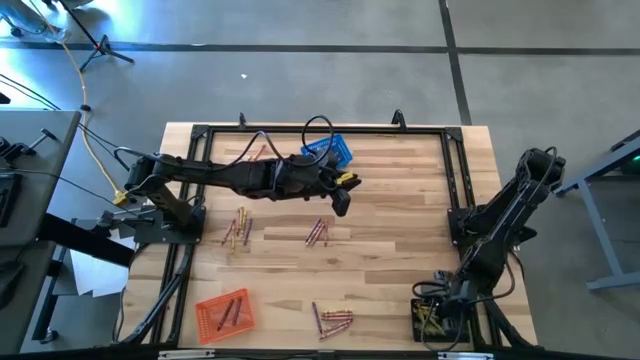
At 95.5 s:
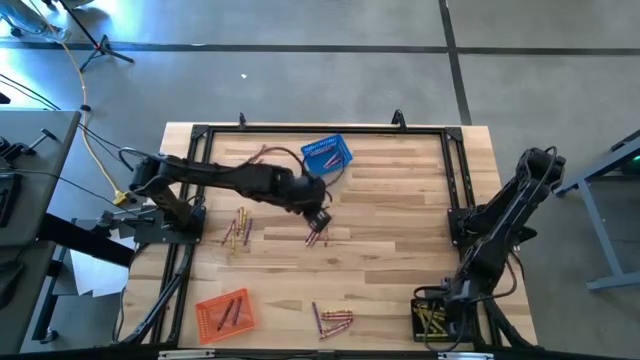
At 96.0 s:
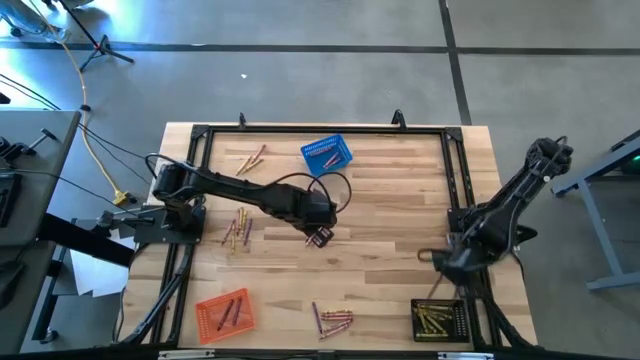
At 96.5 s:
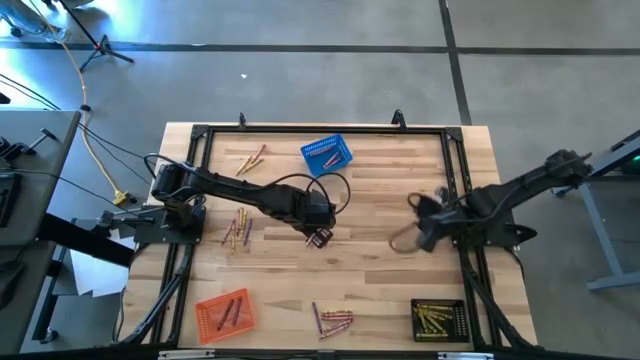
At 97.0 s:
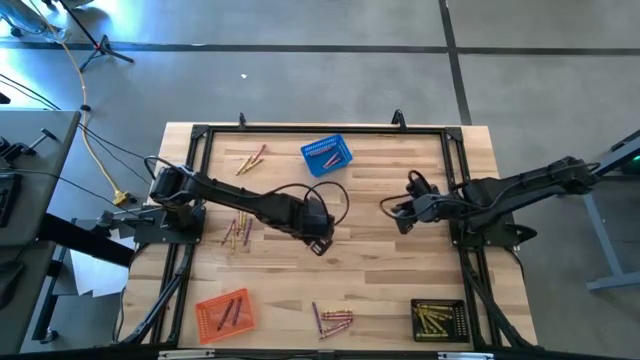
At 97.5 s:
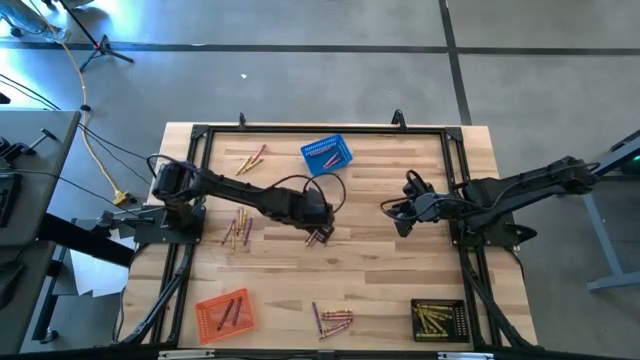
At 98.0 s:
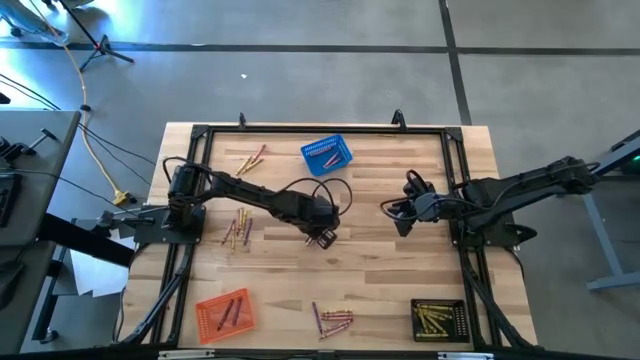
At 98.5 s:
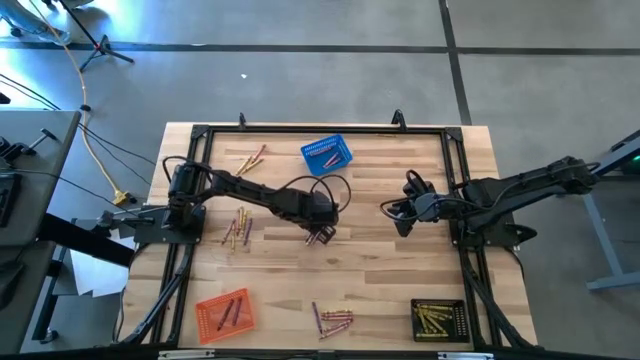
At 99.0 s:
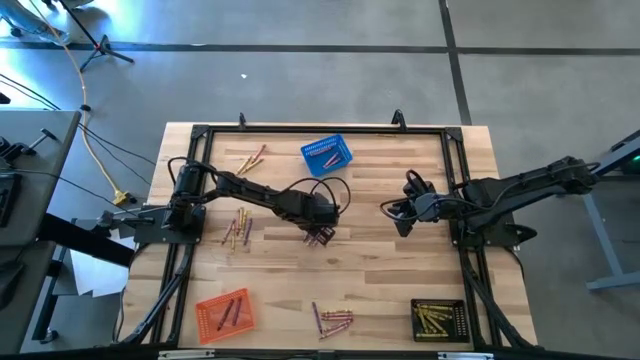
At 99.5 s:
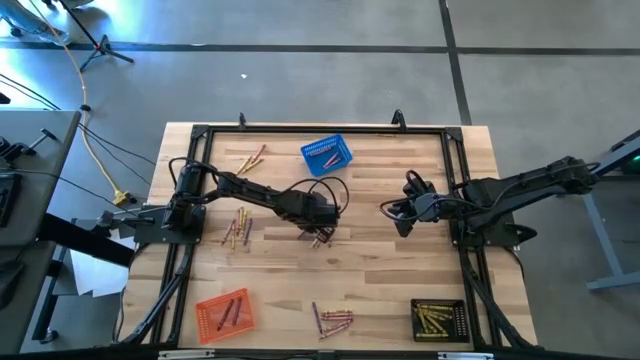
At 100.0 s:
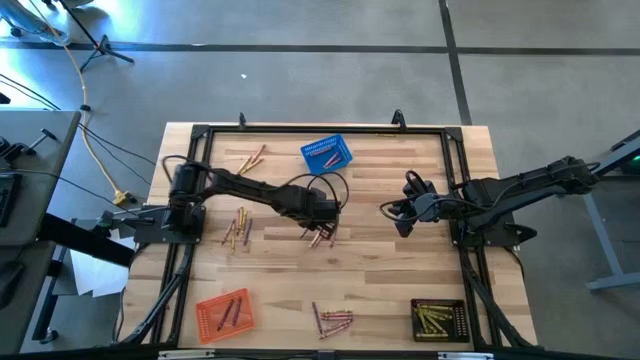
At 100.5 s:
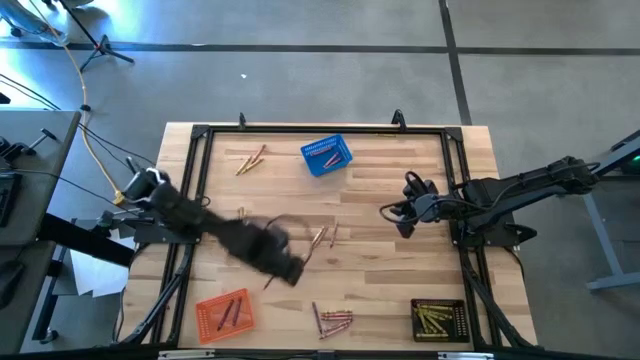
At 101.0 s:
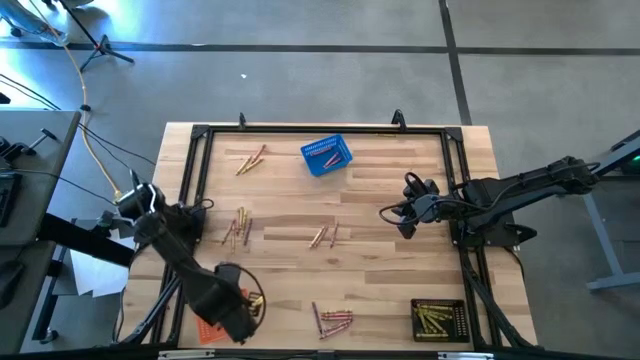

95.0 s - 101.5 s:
Task: Sort crayons
Put the purple crayon into the orange bin

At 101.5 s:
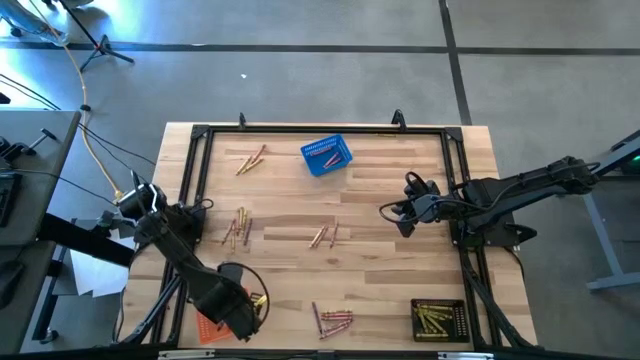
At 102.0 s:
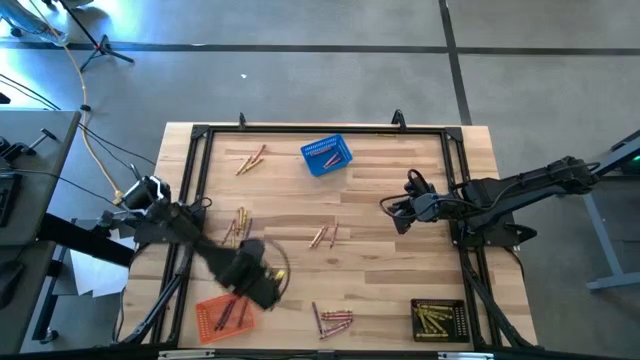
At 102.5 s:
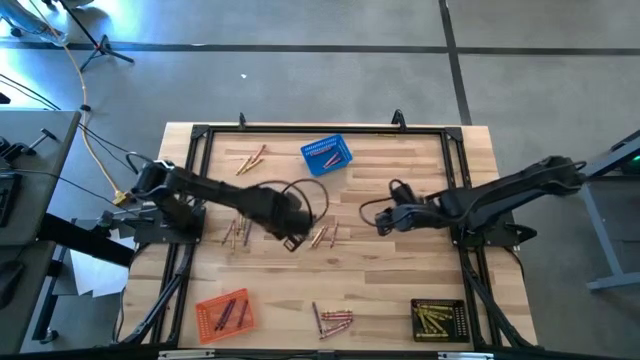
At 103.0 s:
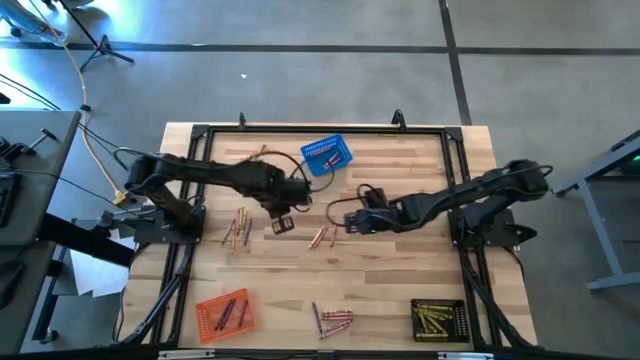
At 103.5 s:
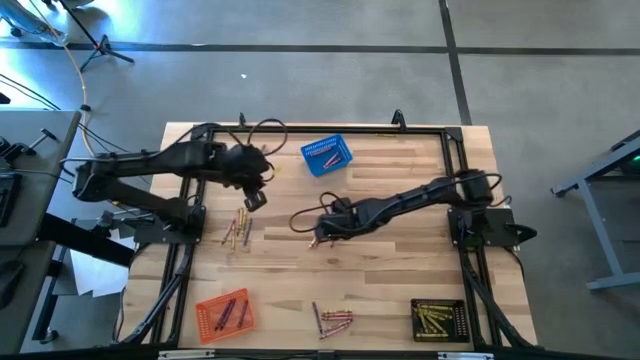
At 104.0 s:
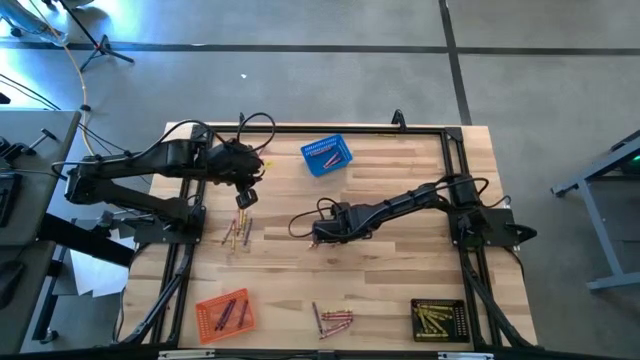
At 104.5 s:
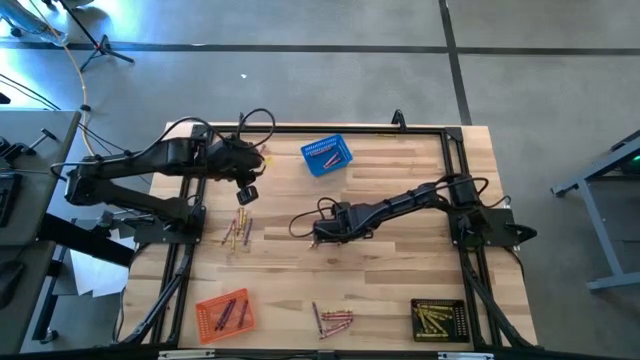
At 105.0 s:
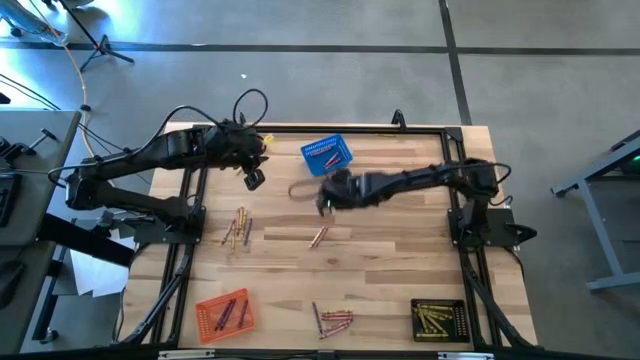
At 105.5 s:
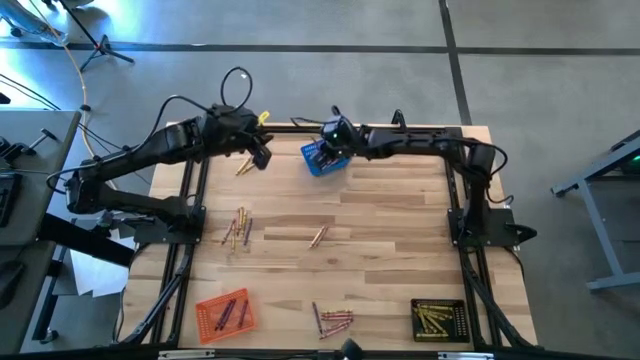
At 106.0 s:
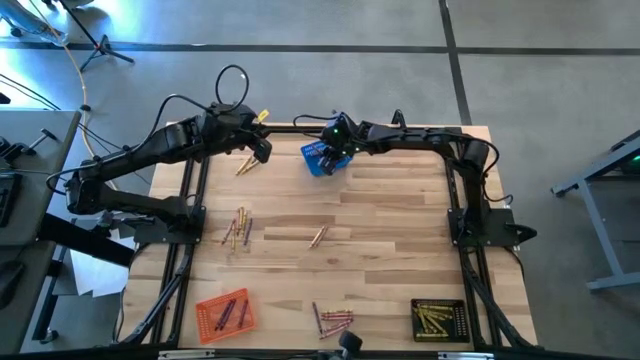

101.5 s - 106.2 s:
Put the red crayon into the blue bin

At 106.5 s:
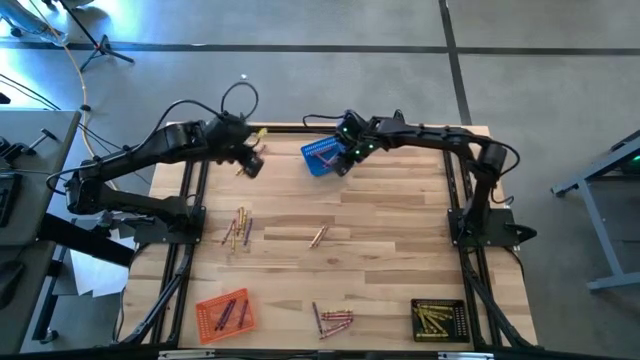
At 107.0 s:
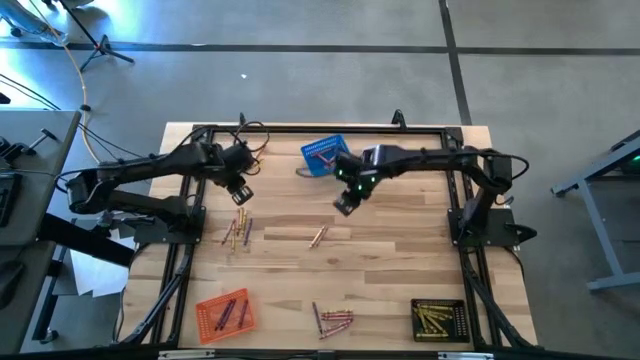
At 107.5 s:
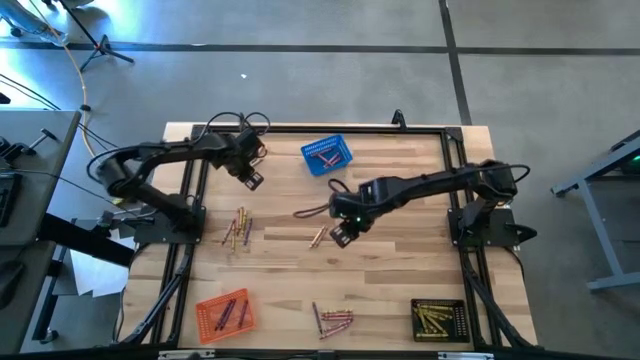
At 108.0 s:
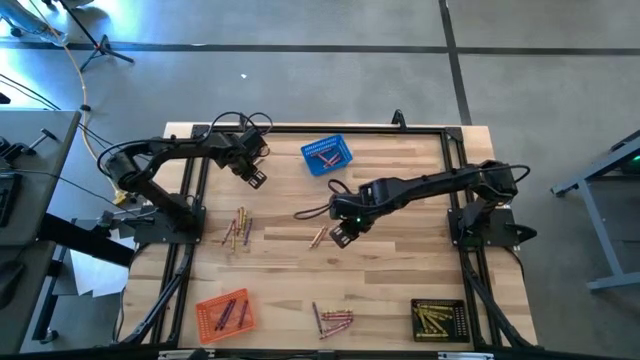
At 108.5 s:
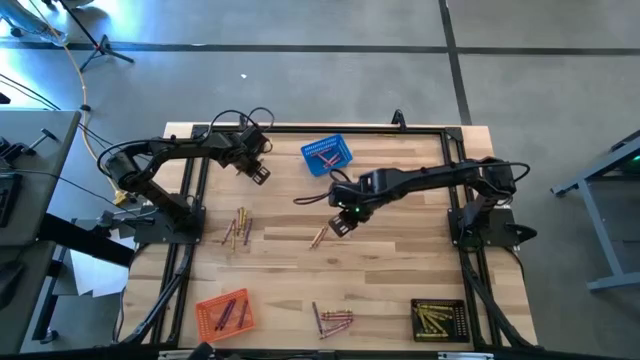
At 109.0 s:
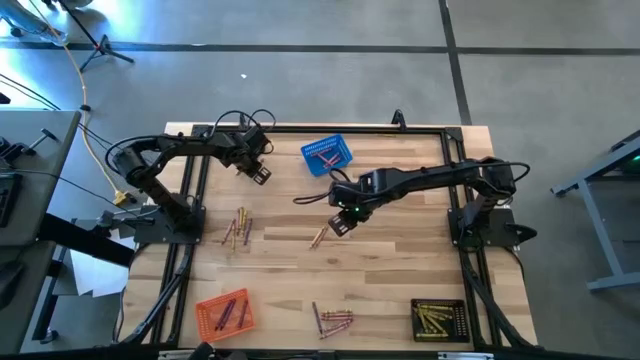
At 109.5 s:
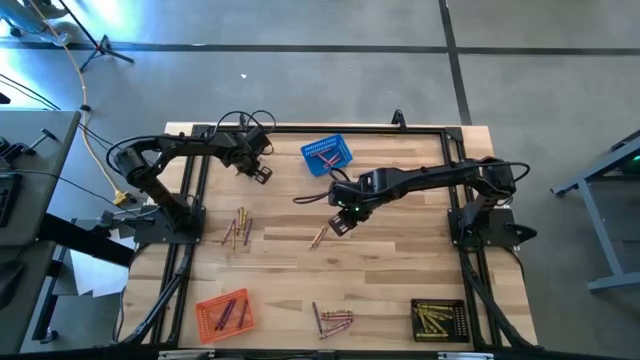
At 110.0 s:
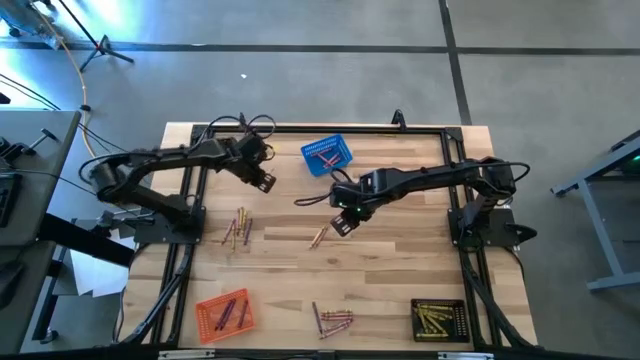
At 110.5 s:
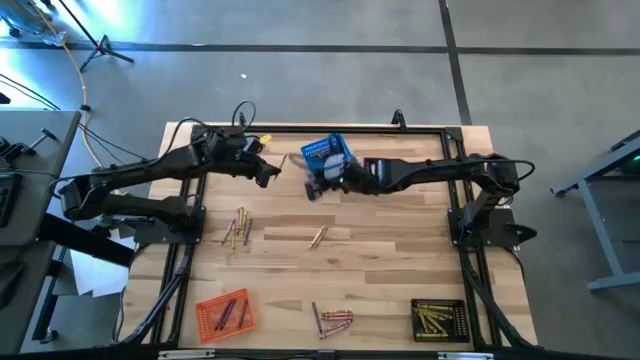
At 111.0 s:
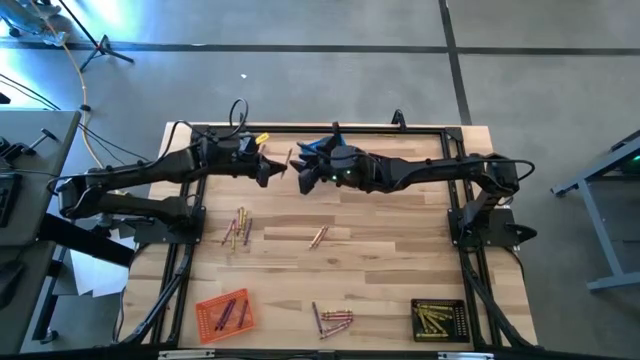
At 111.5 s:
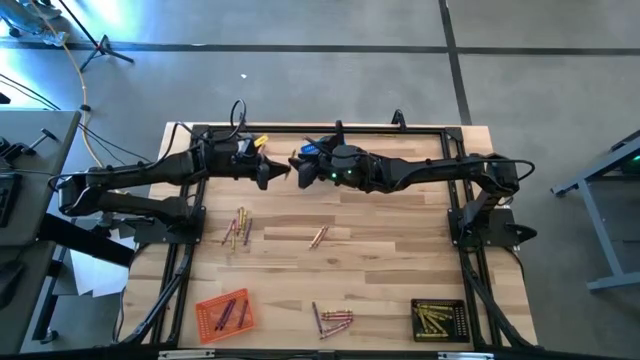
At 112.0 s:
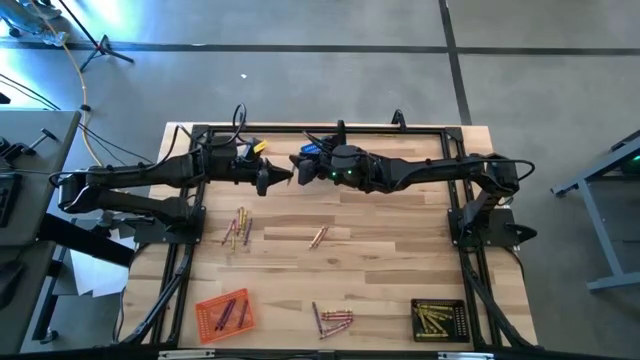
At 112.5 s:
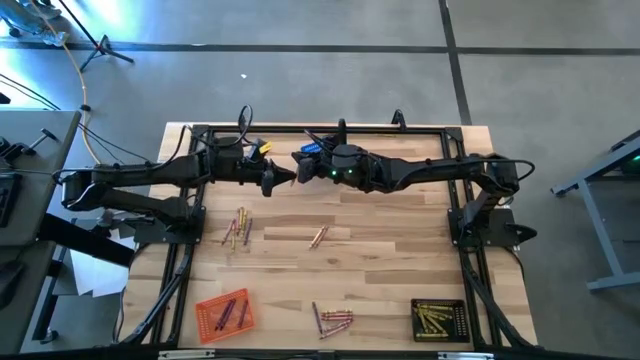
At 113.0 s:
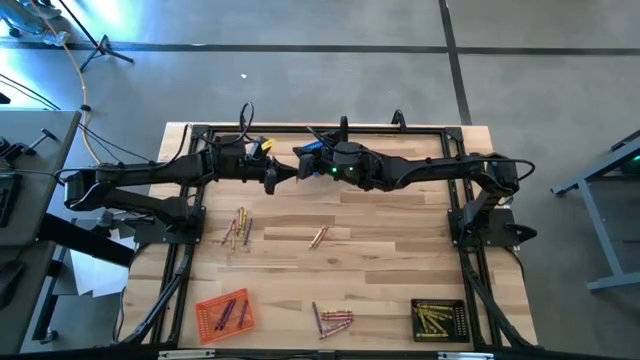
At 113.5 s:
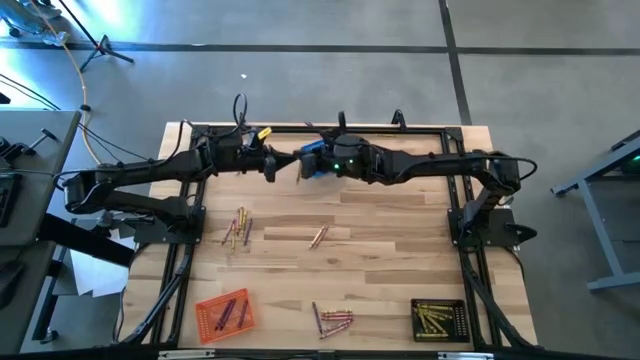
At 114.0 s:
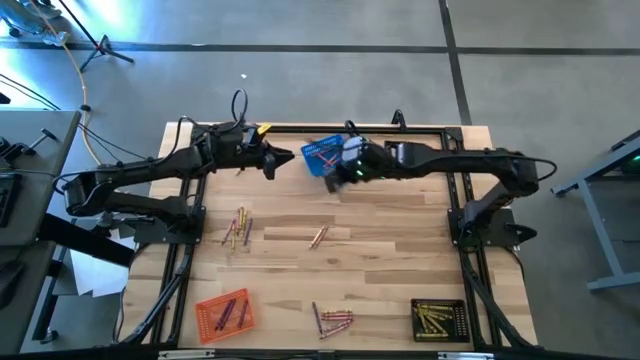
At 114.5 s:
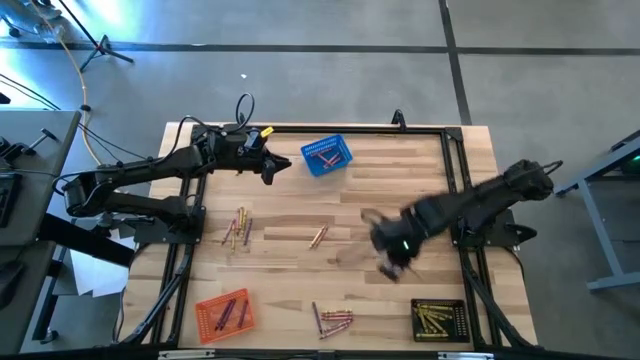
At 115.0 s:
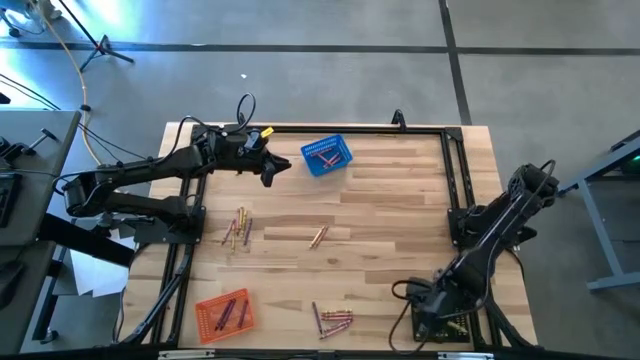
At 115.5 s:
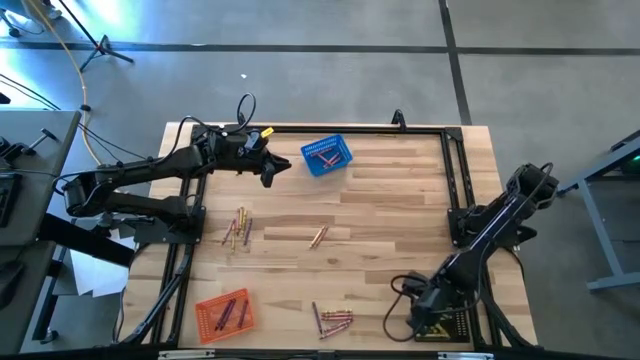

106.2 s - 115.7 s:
Put the yellow crayon into the black bin
